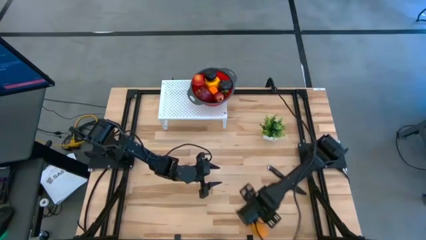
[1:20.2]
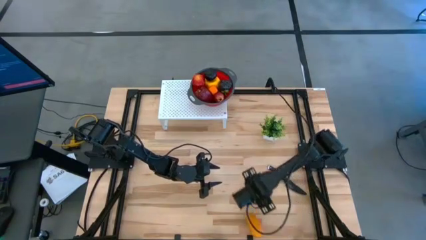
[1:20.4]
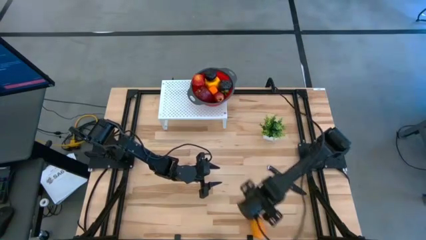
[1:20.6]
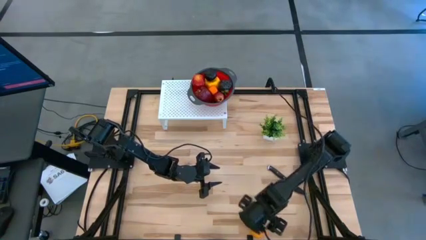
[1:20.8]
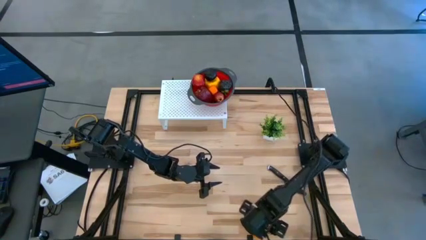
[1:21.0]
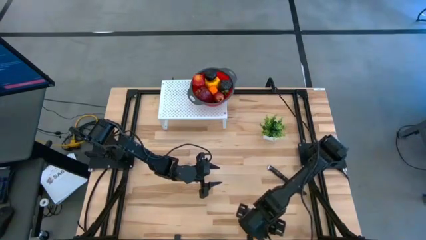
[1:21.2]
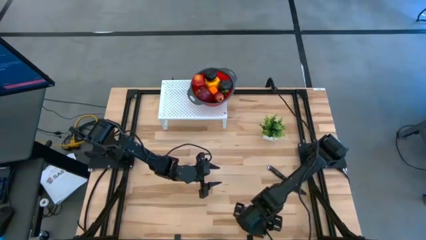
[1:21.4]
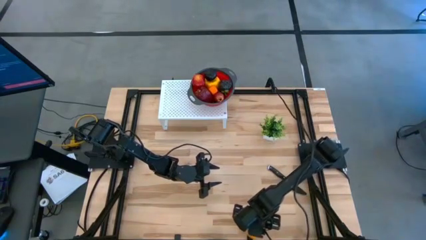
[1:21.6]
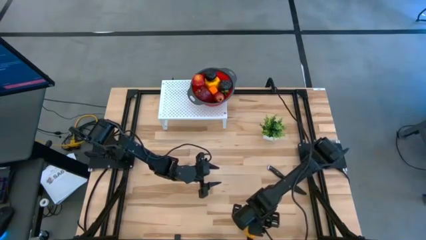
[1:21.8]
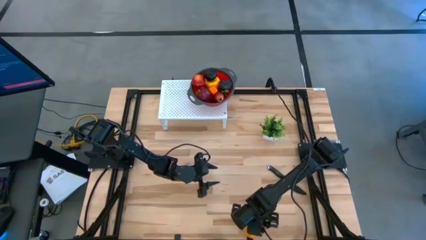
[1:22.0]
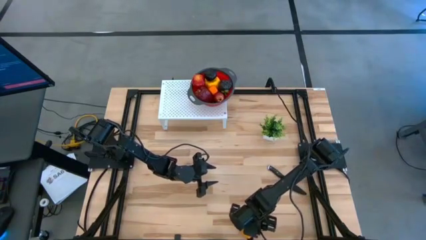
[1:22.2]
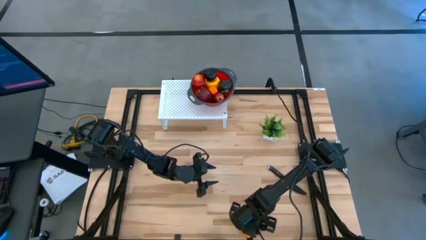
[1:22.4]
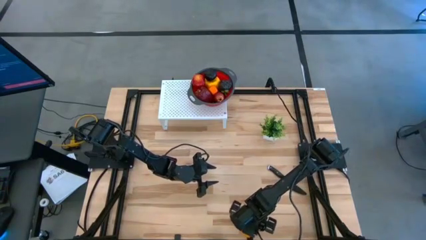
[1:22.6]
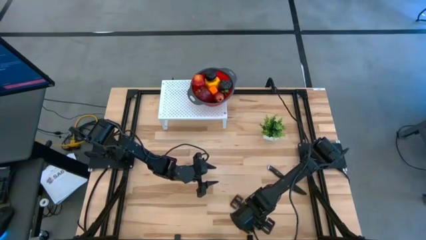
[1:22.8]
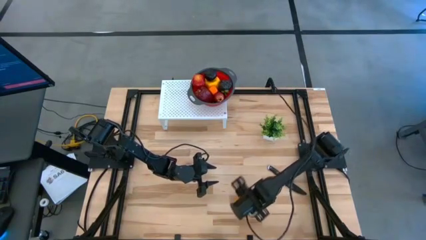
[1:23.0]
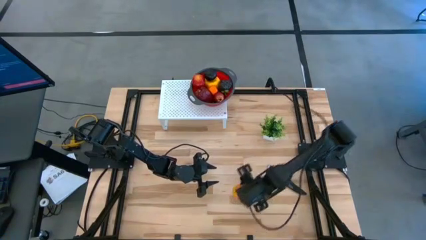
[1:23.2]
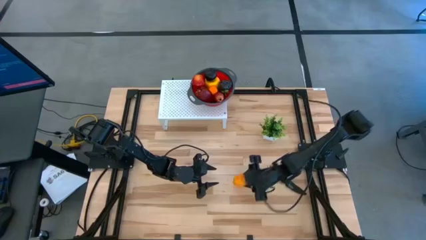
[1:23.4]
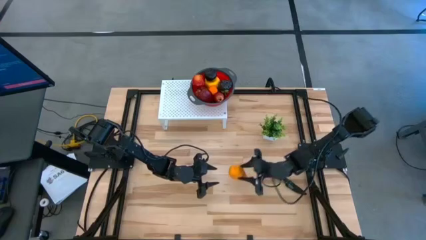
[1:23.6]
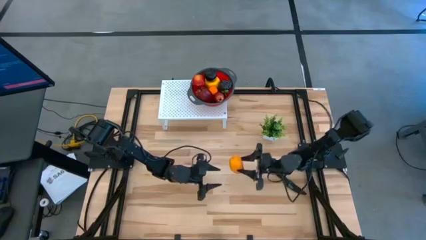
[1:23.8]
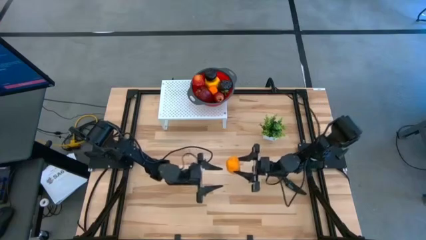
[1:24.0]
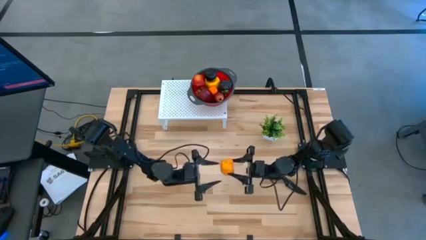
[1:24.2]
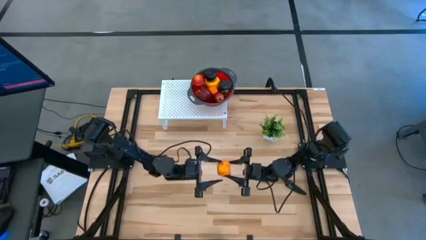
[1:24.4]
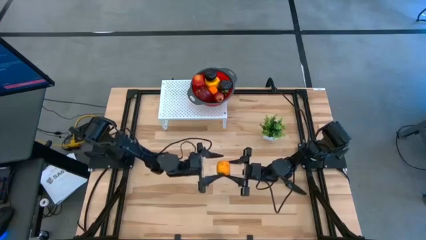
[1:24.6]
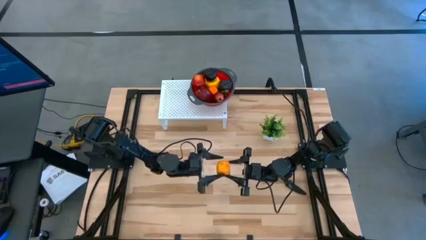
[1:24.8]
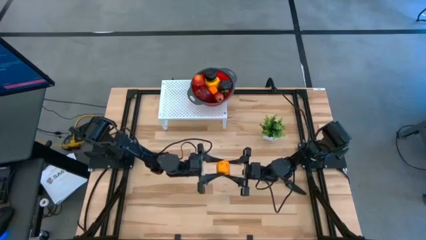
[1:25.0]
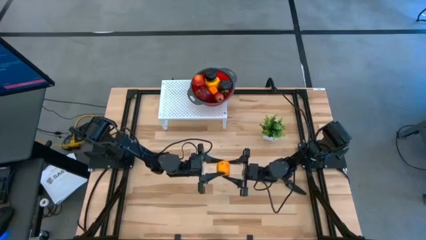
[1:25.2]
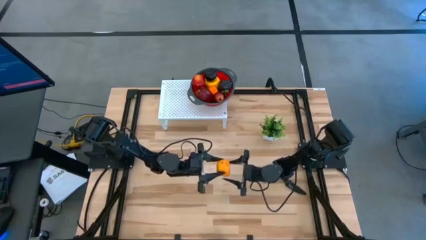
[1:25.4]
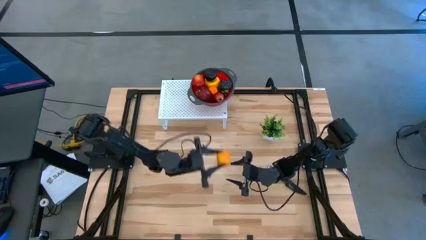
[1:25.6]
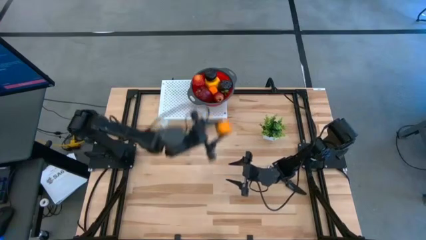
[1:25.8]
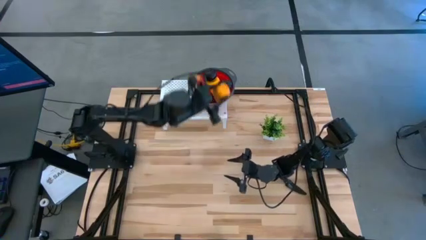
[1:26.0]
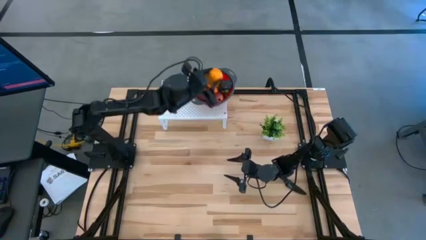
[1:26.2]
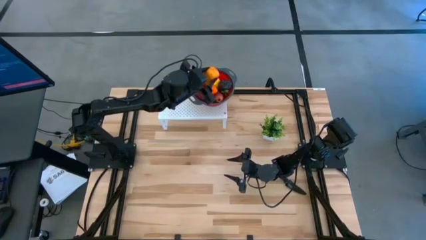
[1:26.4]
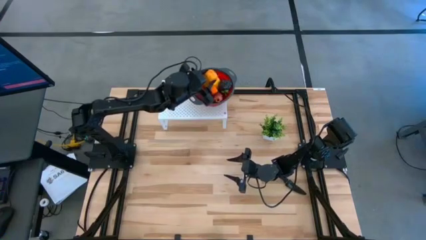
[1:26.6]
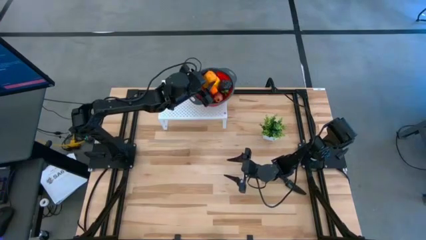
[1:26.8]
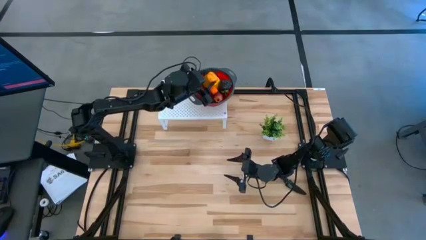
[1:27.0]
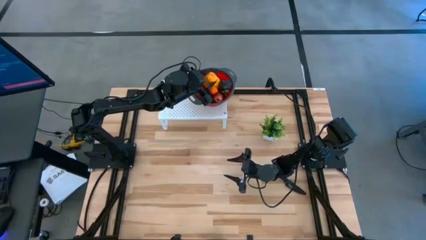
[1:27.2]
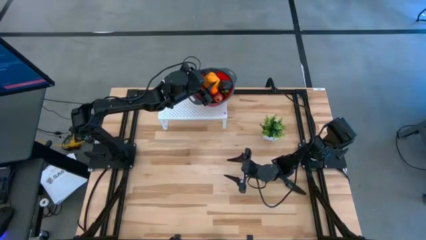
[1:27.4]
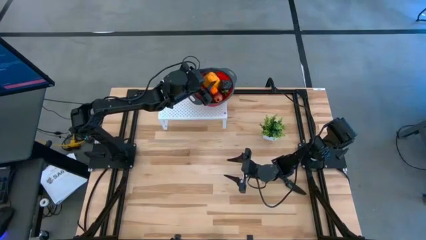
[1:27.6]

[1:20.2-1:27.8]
Task: Pick & Place Fruit
Put the yellow mango into the red strainer bowl on the shelf

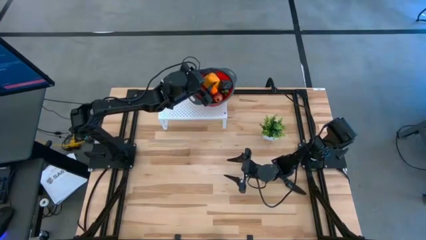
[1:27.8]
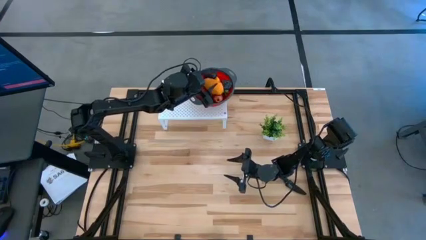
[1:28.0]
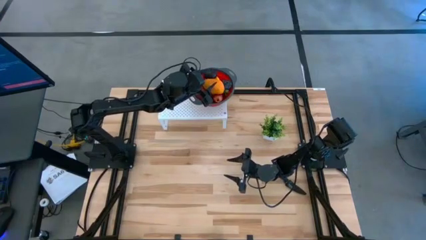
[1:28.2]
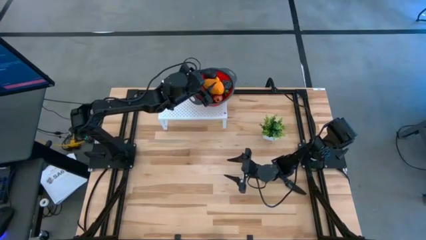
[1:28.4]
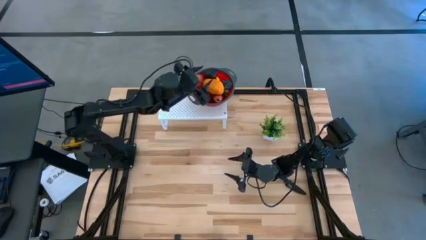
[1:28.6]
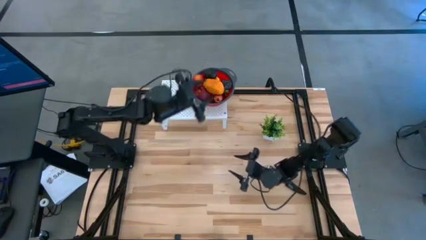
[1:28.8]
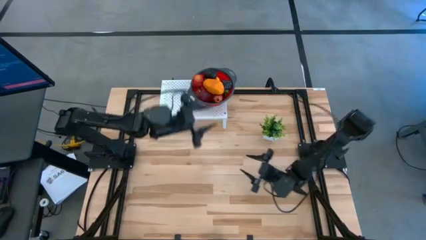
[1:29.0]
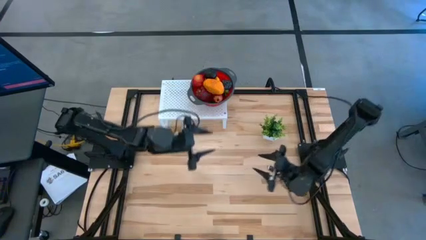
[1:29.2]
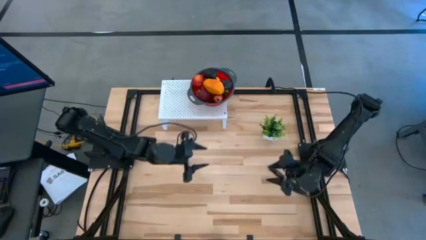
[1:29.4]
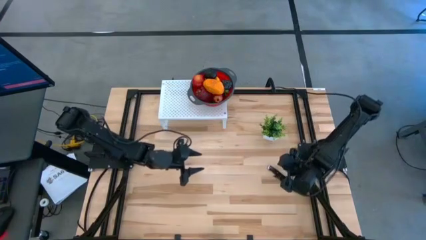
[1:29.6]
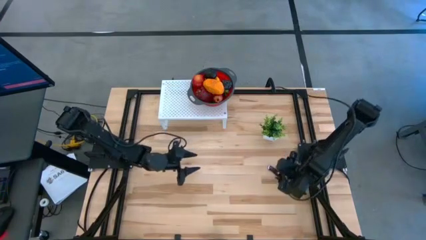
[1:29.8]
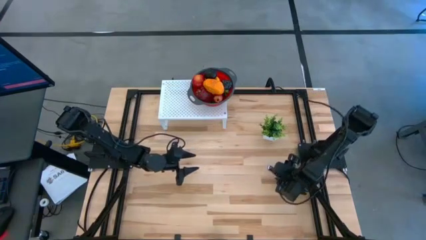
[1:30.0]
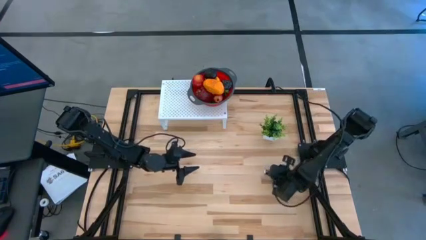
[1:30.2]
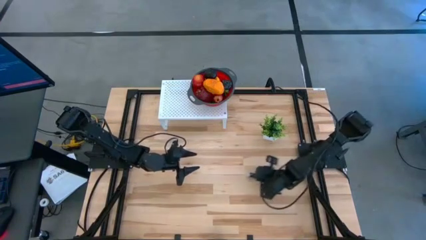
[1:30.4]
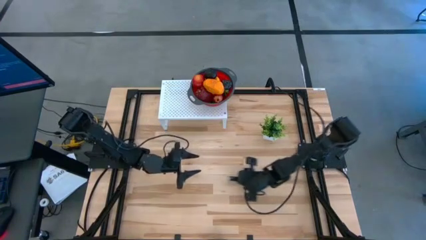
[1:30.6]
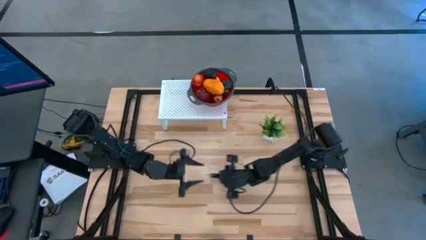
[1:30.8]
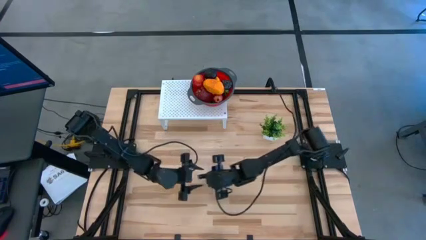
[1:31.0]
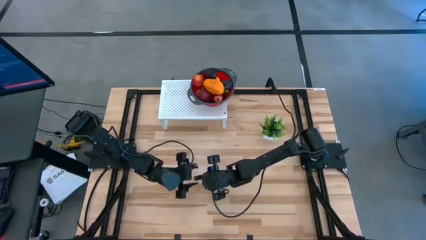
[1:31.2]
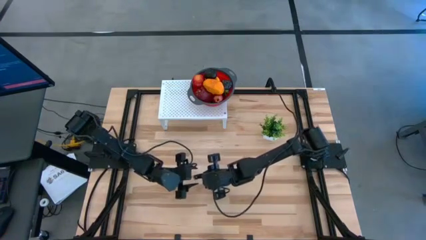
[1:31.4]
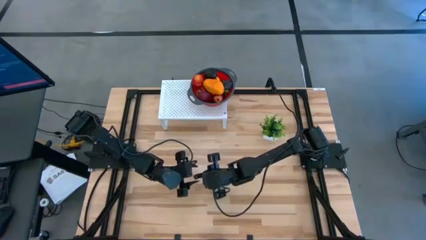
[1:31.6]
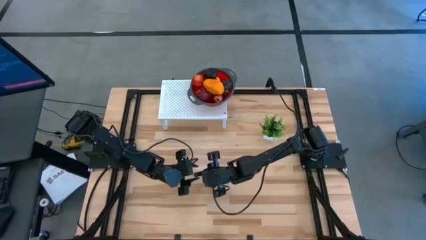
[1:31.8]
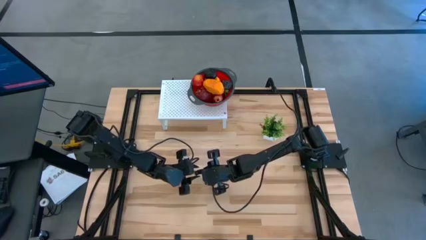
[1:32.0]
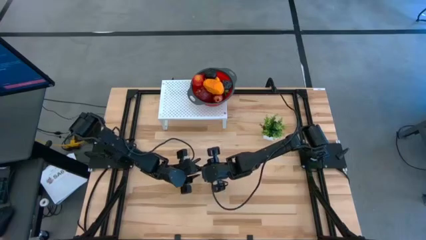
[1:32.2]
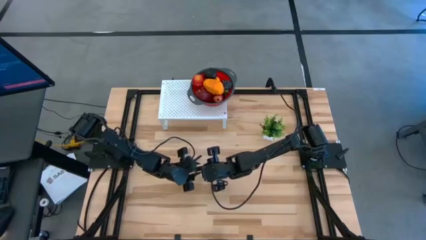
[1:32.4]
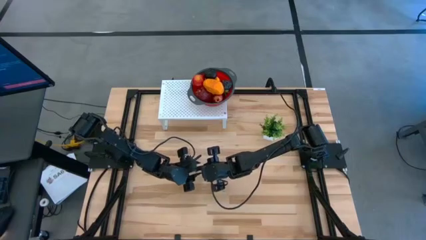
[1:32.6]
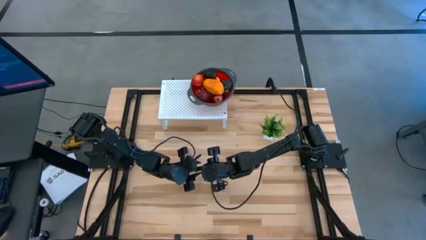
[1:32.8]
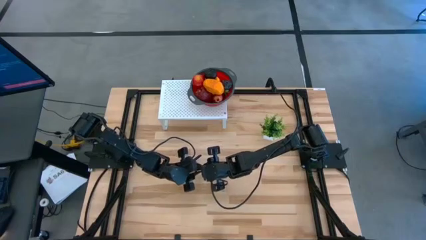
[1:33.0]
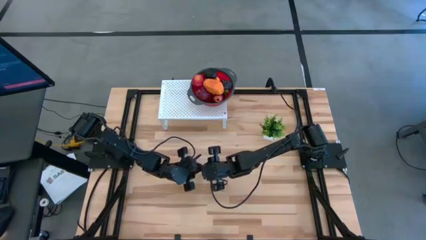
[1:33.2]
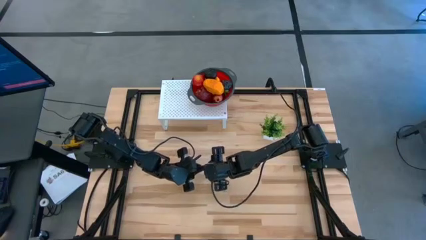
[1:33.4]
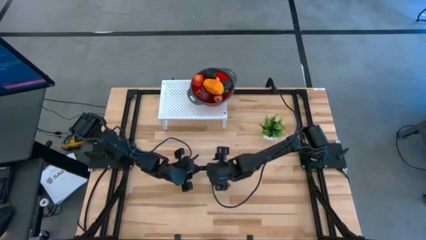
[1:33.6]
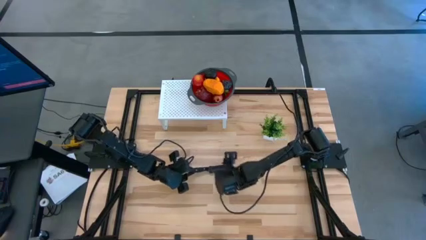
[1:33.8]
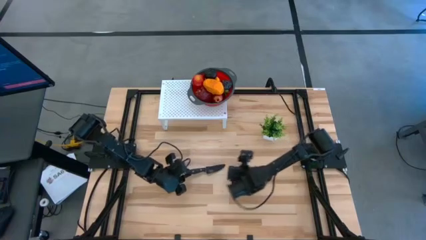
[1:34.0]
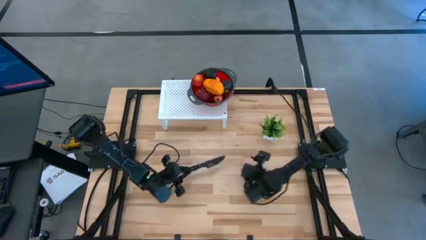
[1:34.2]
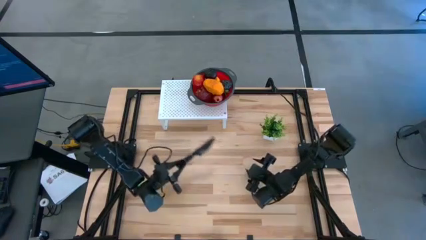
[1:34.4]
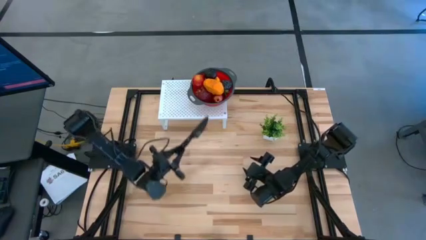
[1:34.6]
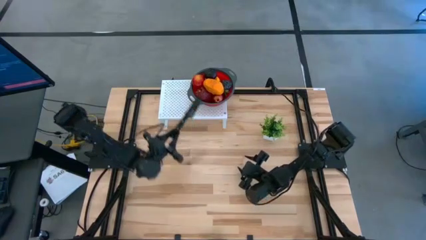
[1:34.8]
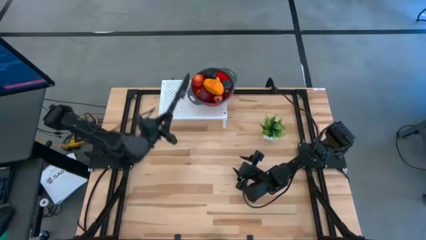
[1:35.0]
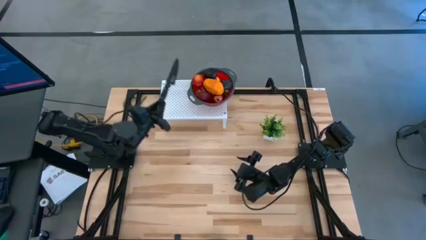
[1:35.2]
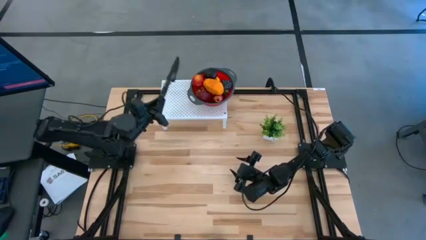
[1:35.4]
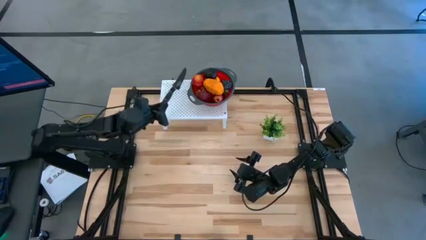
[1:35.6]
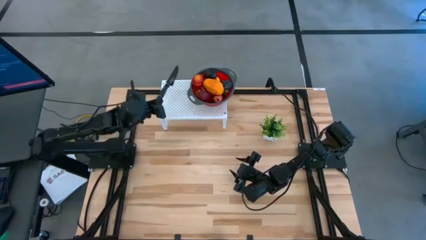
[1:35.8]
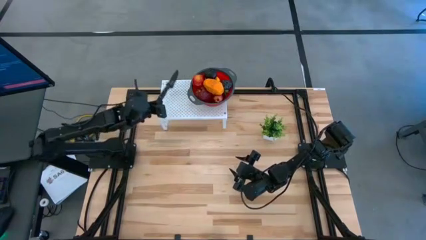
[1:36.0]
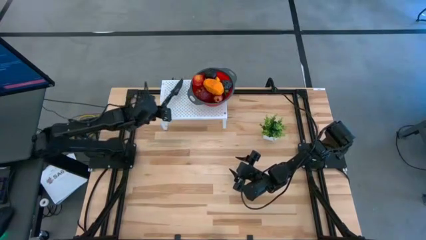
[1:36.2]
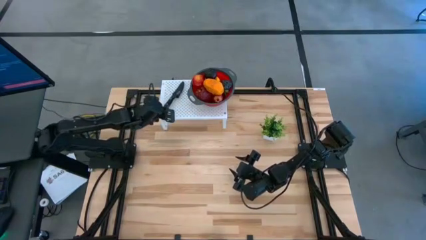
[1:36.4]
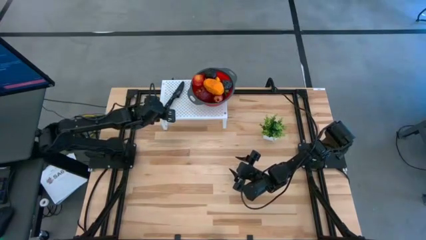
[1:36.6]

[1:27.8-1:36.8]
Put the black table knife on the shelf
